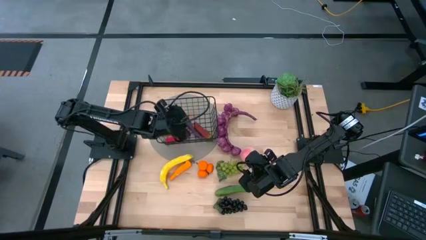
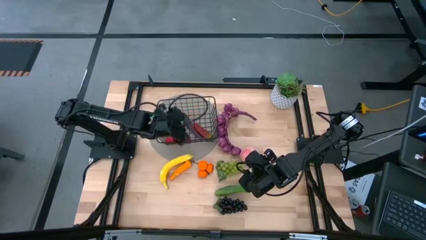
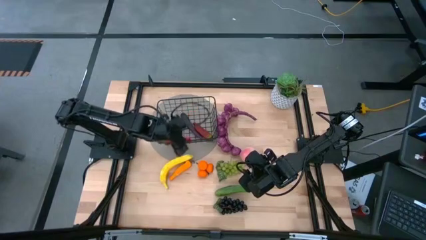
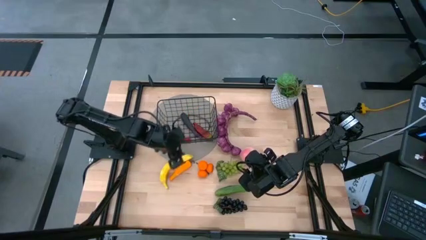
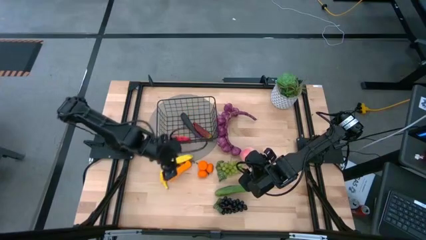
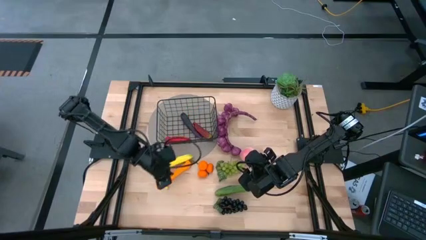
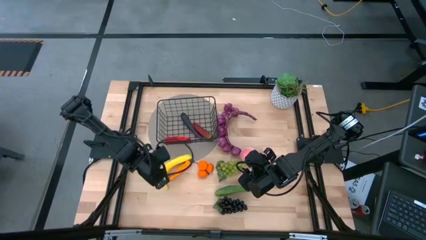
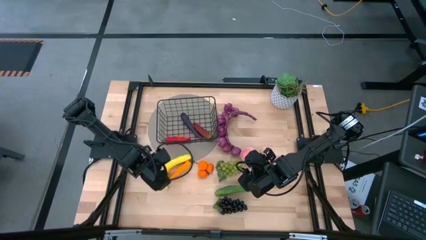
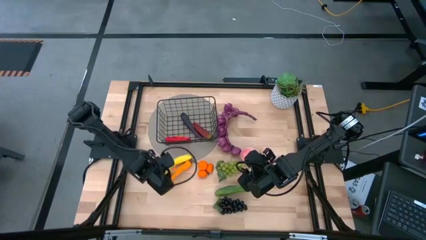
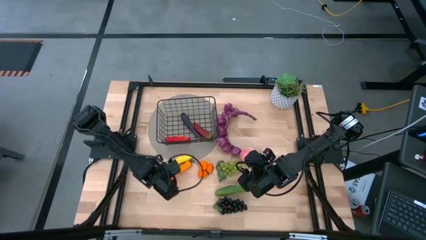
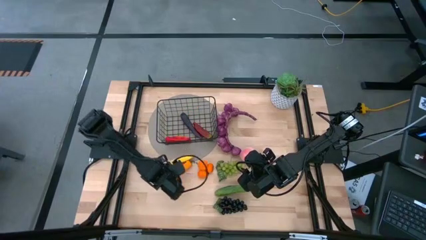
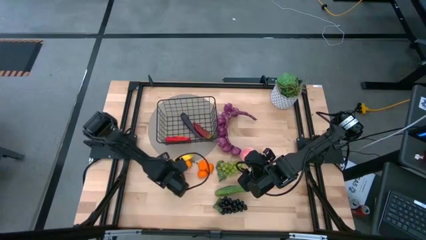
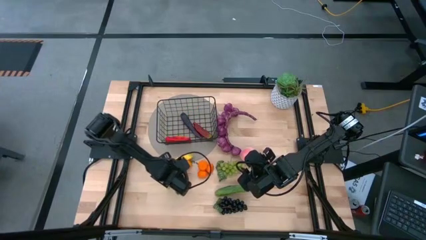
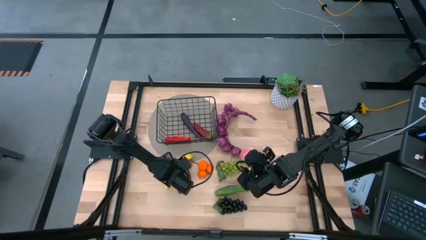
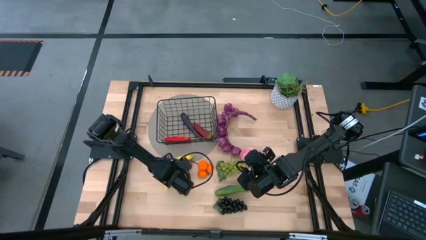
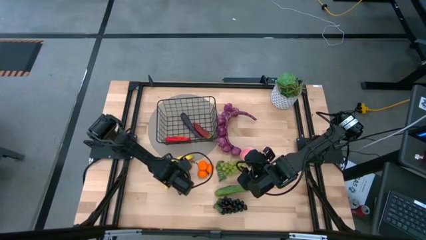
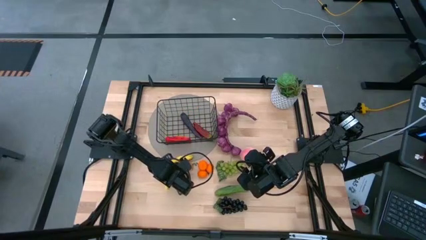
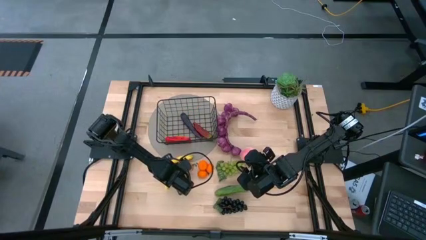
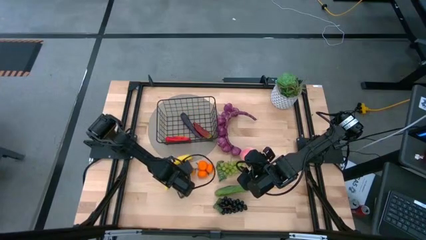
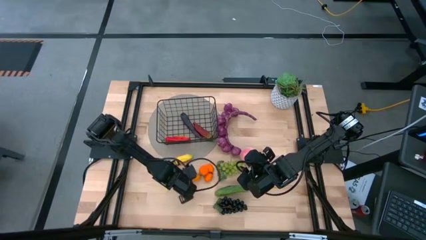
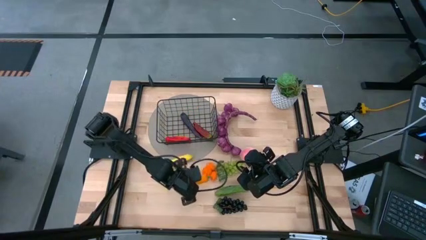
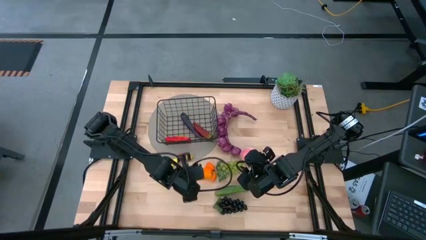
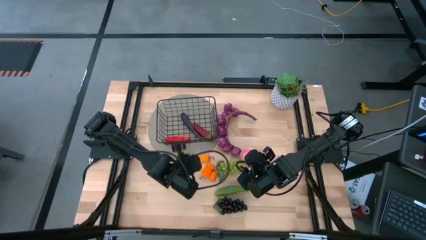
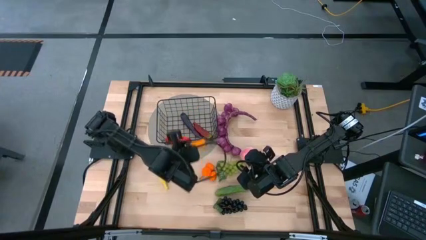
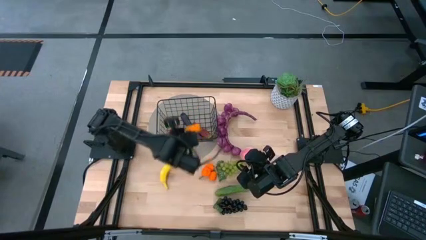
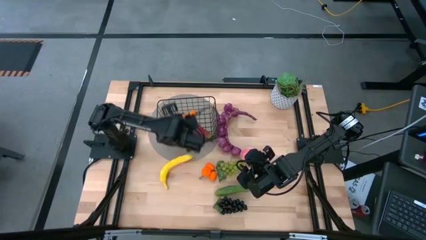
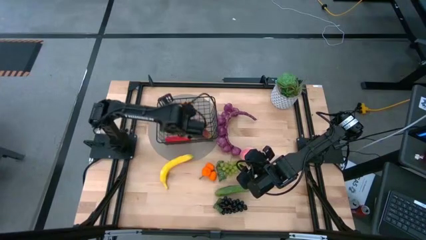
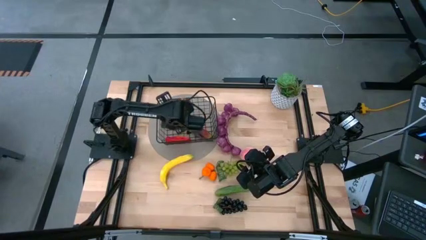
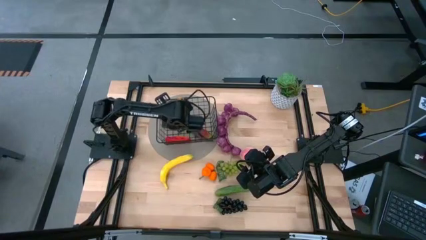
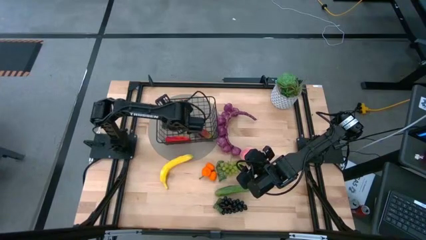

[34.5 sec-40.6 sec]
Task: Build produce basket
Put the orange chili pepper into the wire basket

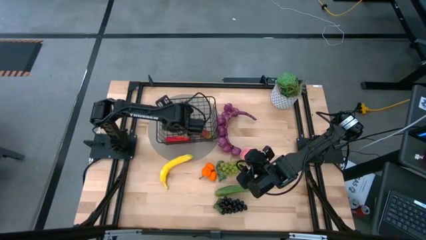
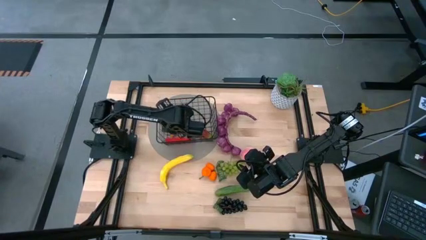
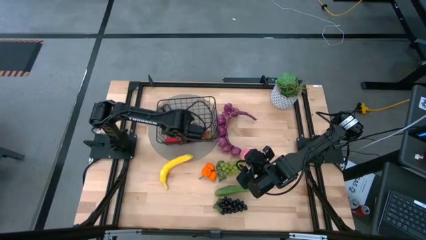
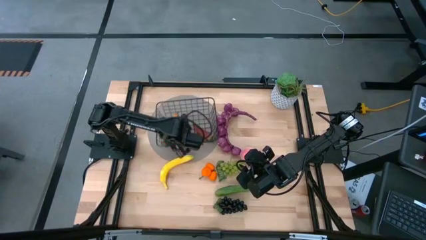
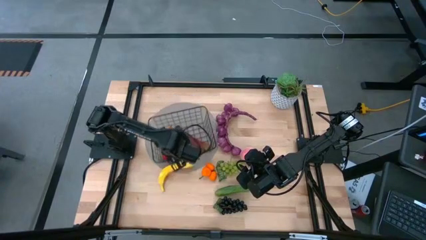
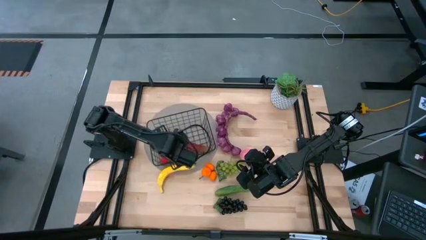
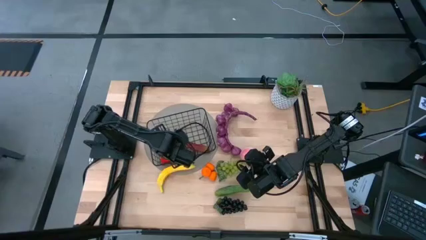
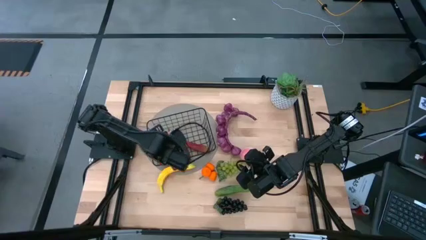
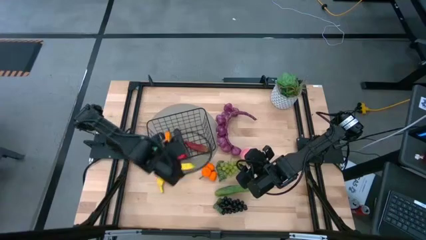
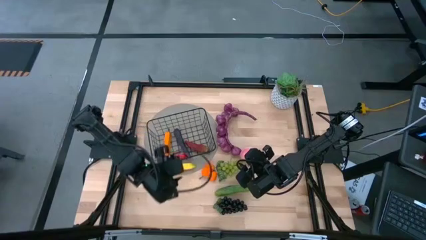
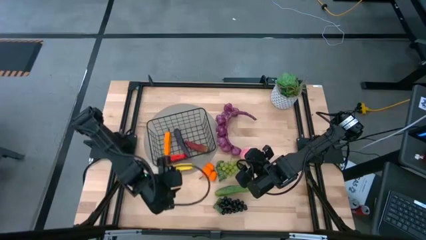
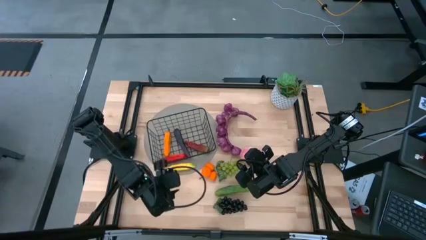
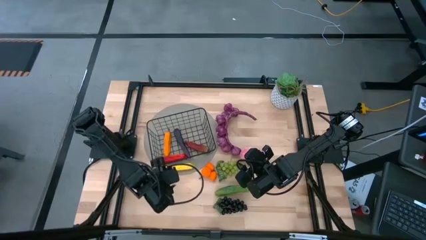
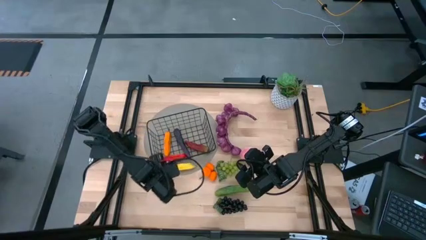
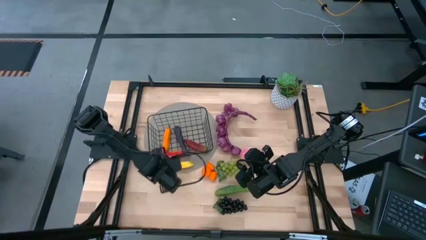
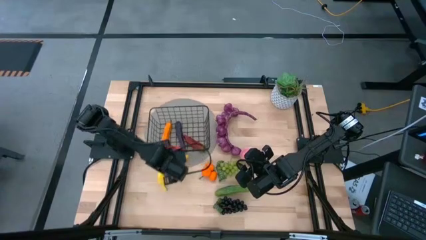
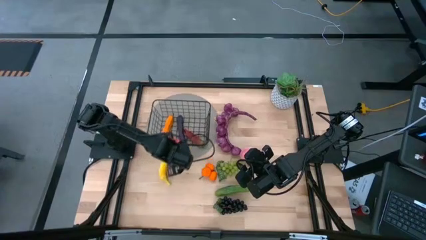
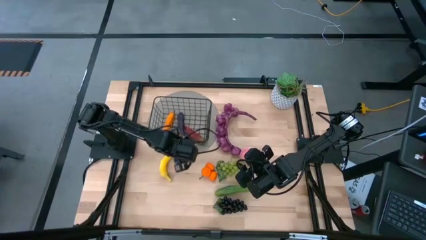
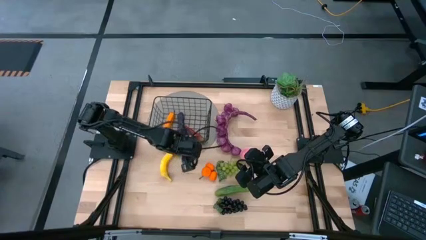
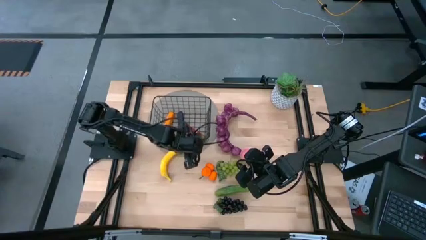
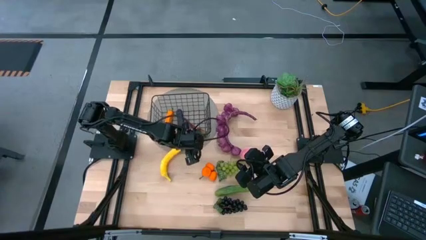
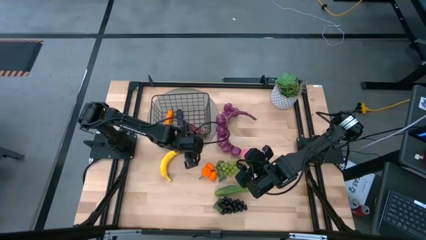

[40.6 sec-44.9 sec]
Adjust the wire basket

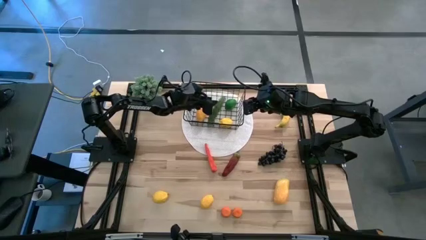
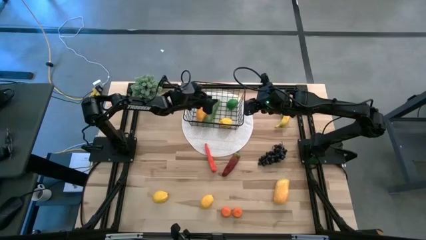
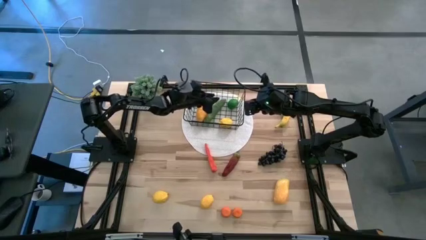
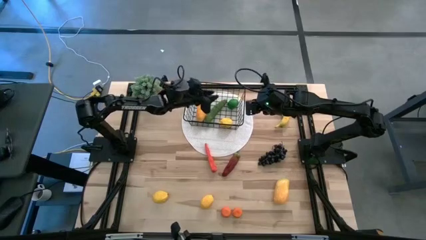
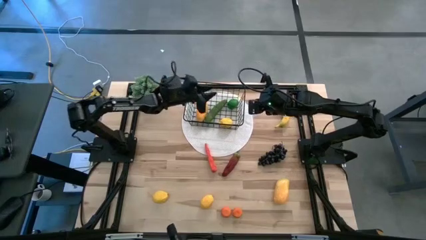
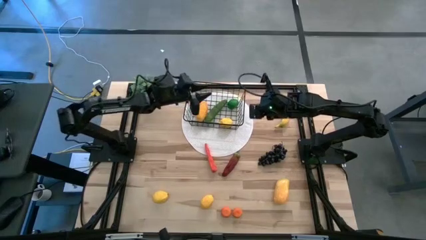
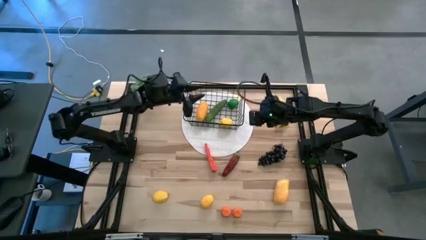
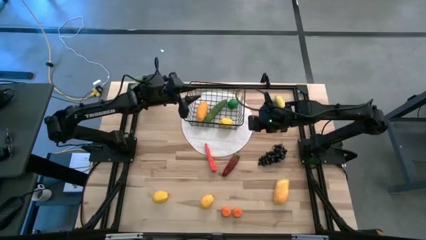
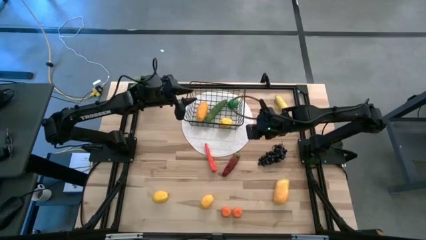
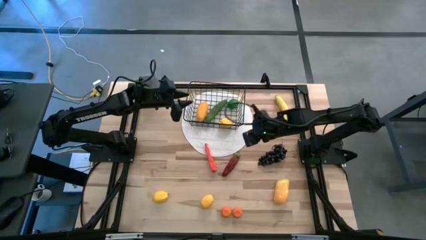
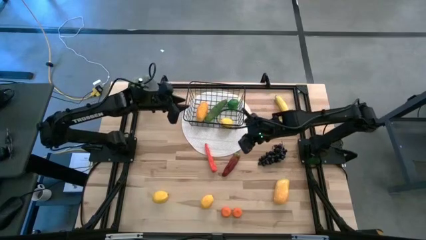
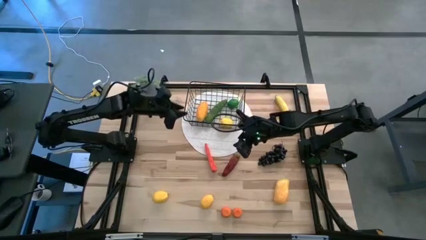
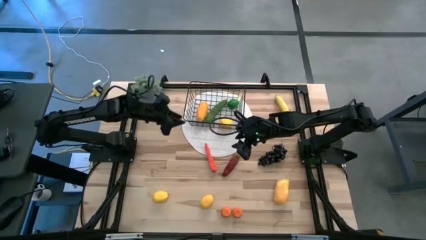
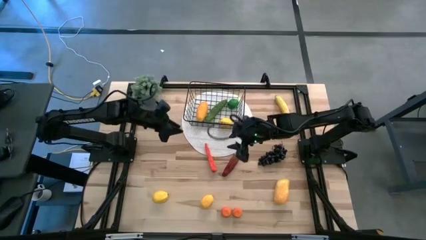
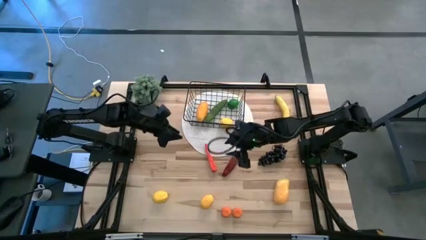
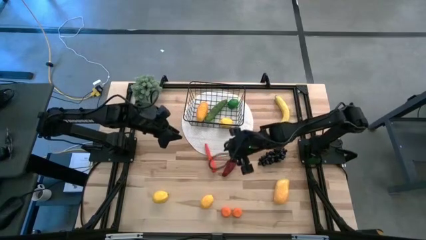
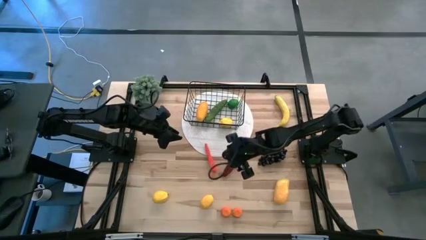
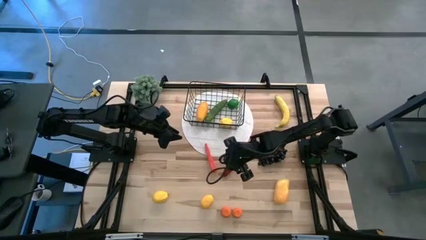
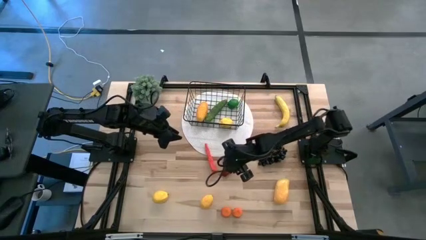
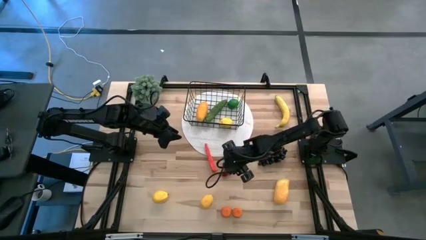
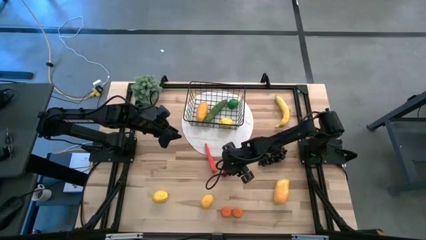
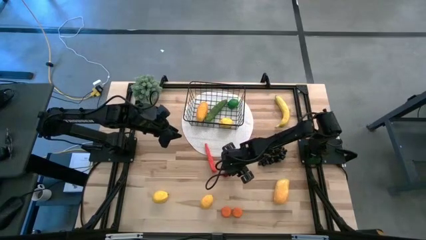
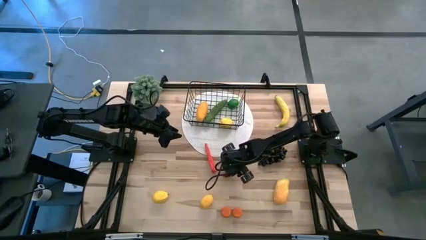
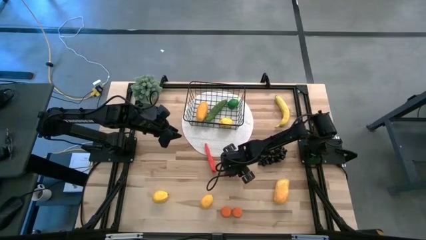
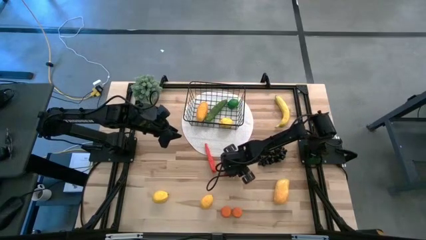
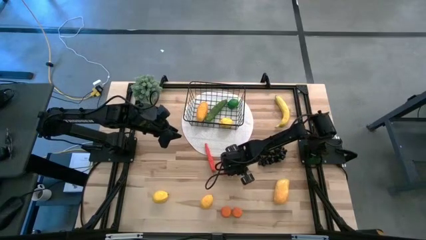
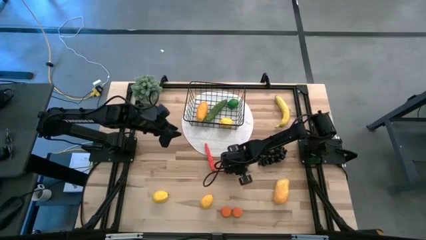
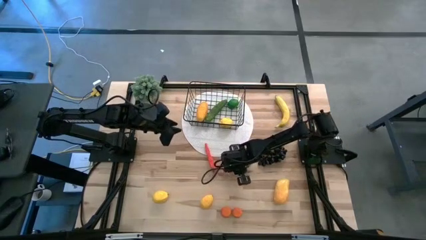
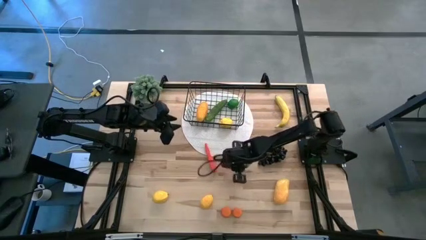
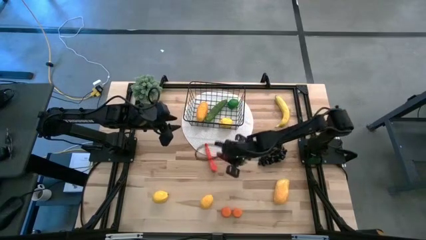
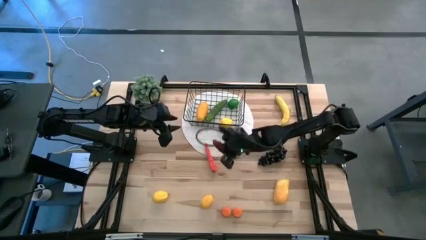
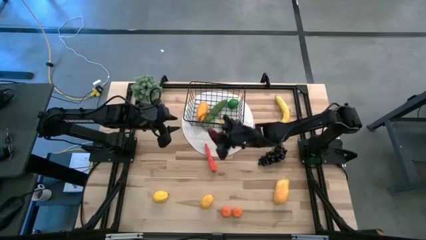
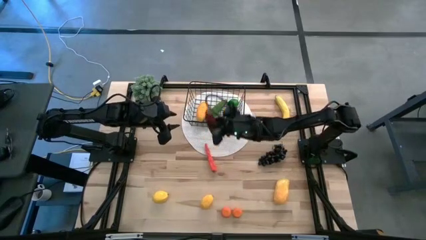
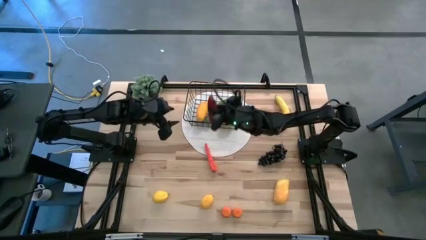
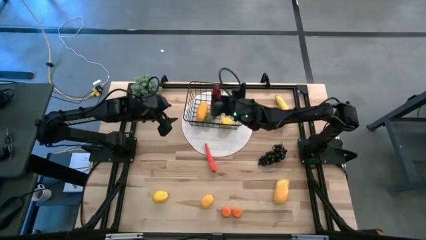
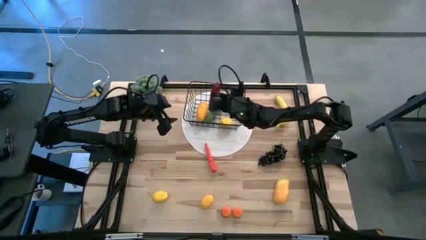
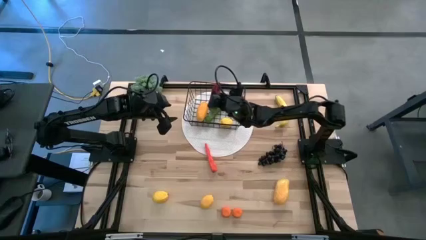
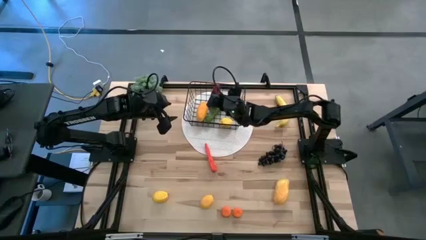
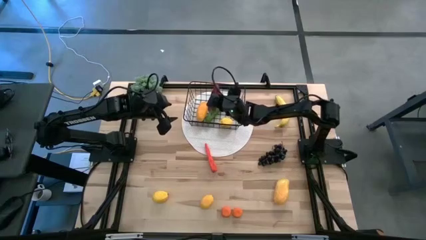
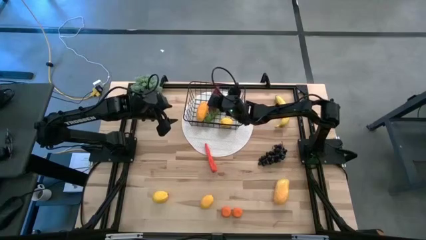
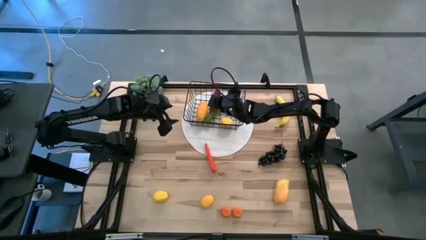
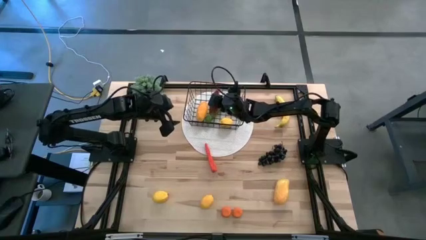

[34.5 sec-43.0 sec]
Task: Build produce basket
Put the chili pepper into the wire basket
